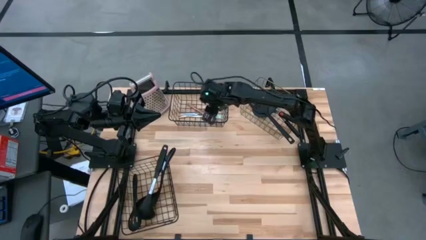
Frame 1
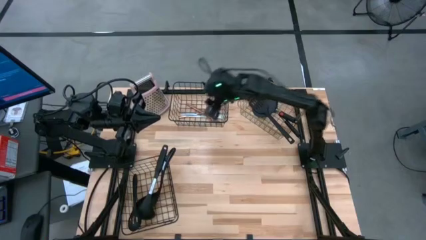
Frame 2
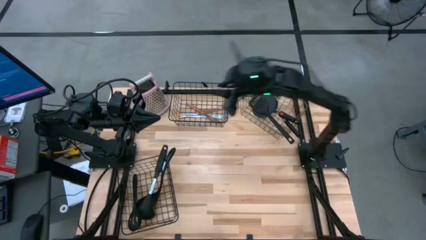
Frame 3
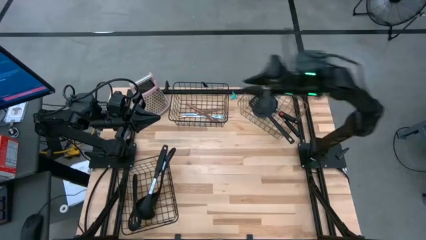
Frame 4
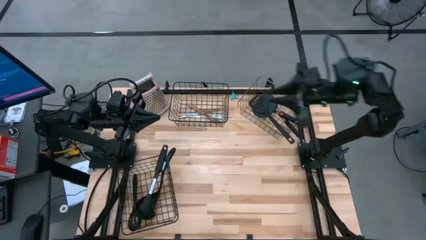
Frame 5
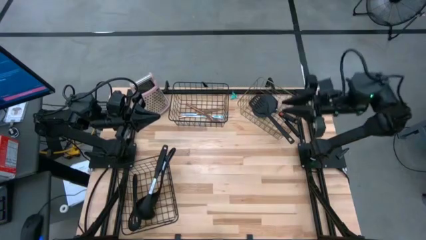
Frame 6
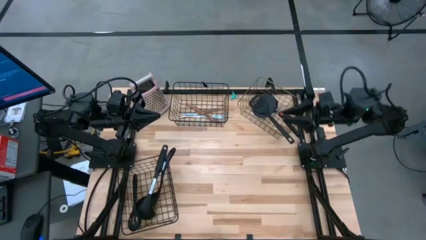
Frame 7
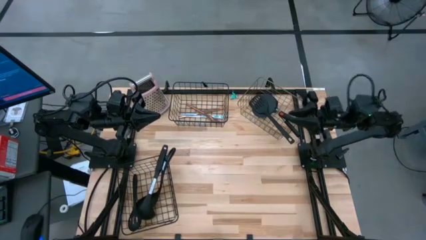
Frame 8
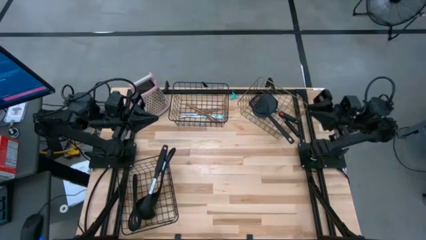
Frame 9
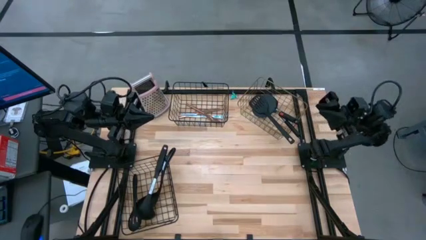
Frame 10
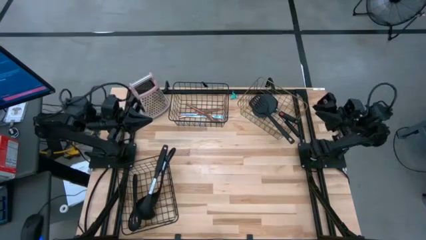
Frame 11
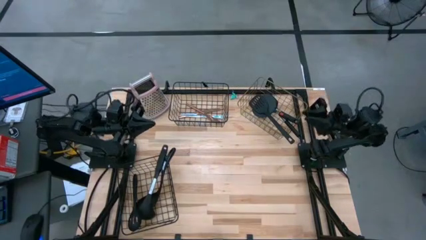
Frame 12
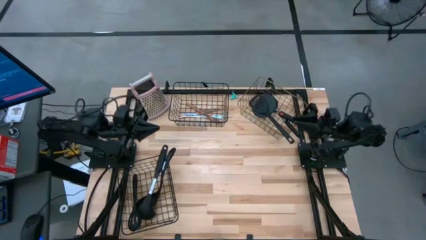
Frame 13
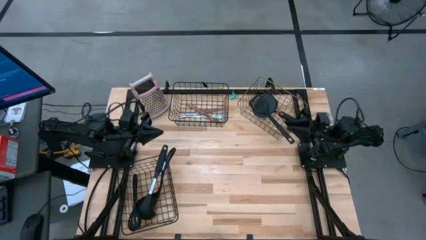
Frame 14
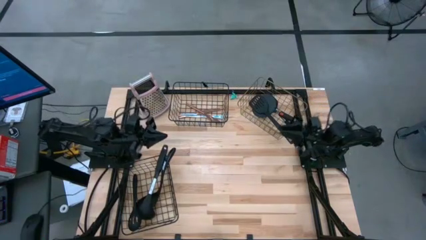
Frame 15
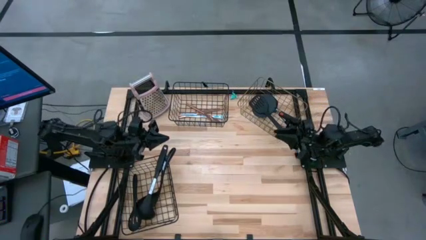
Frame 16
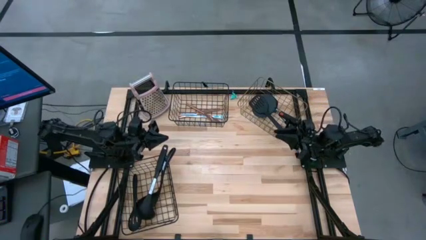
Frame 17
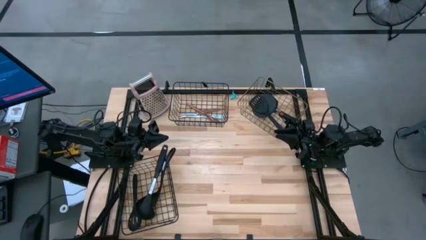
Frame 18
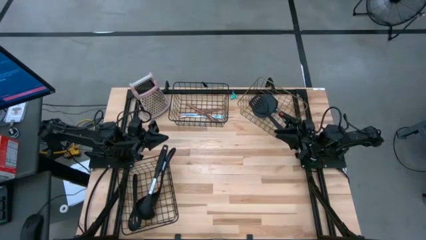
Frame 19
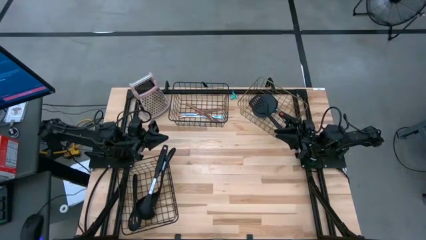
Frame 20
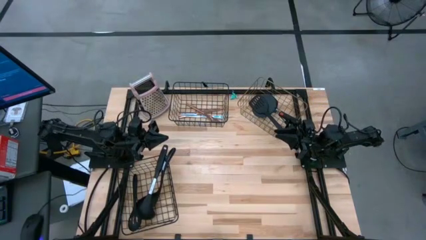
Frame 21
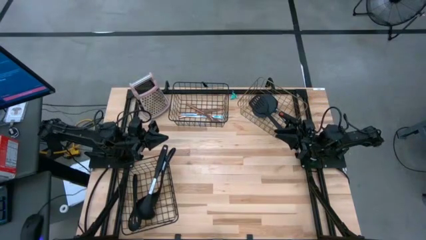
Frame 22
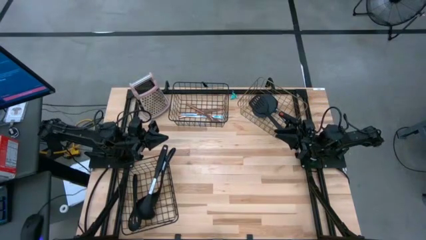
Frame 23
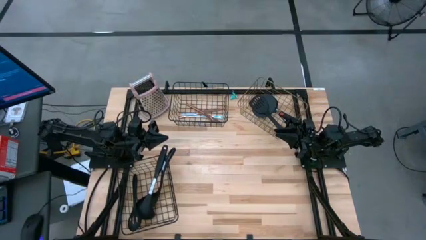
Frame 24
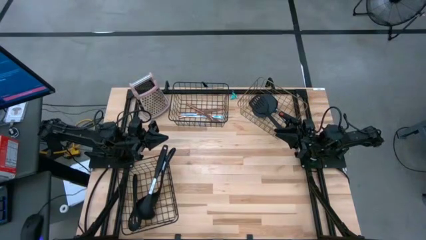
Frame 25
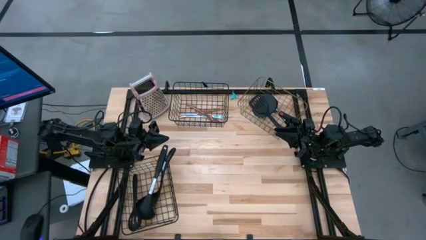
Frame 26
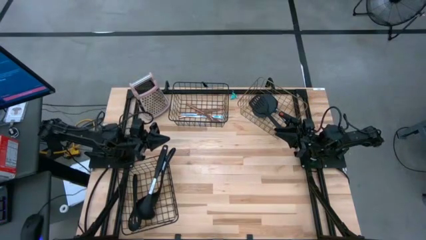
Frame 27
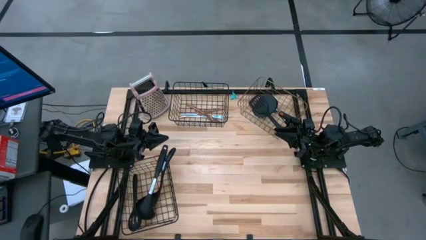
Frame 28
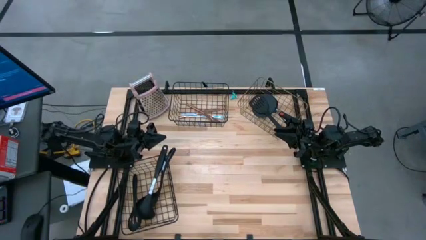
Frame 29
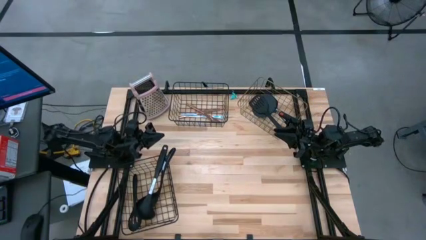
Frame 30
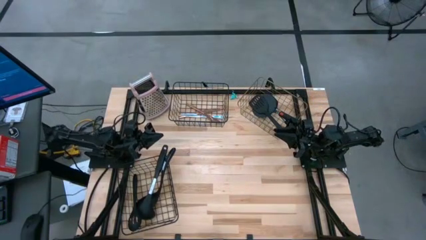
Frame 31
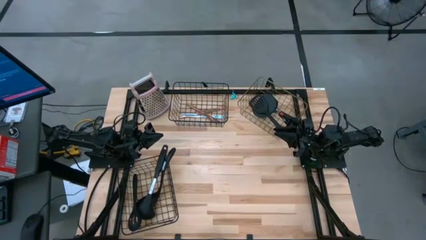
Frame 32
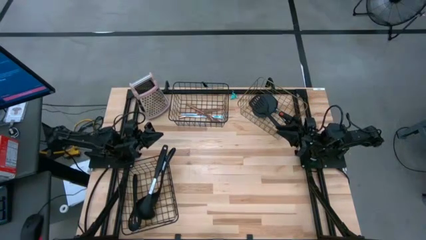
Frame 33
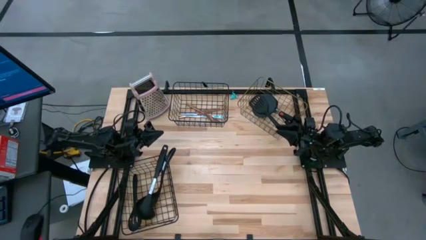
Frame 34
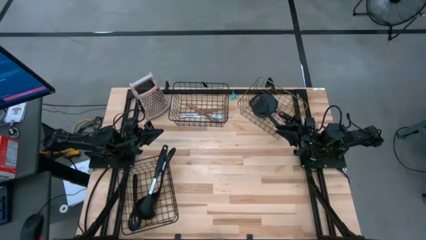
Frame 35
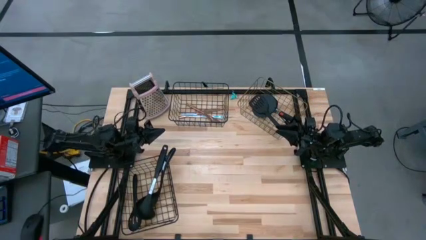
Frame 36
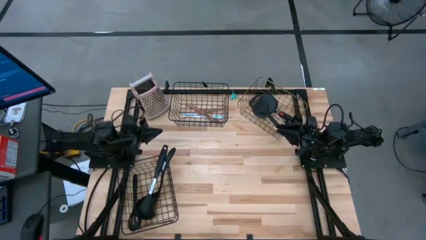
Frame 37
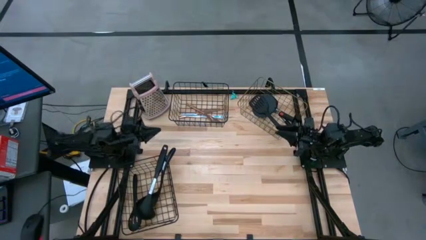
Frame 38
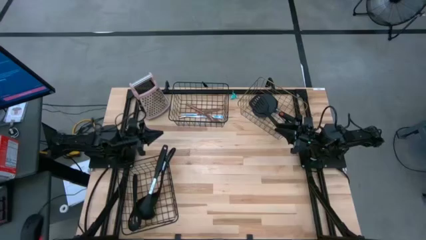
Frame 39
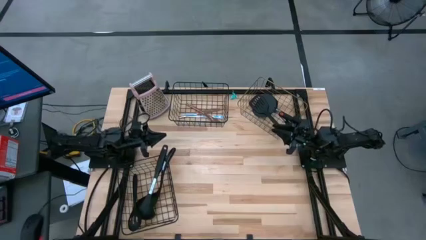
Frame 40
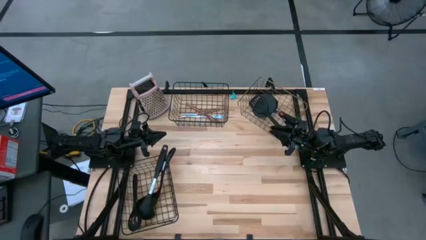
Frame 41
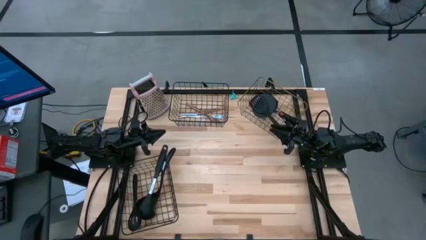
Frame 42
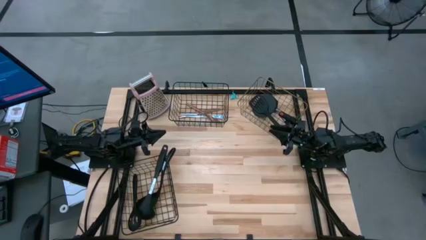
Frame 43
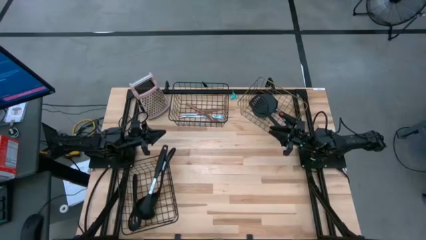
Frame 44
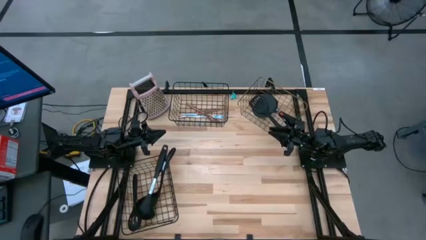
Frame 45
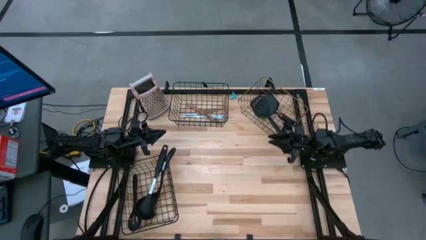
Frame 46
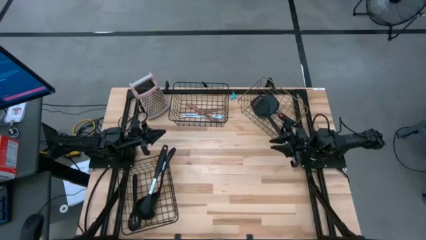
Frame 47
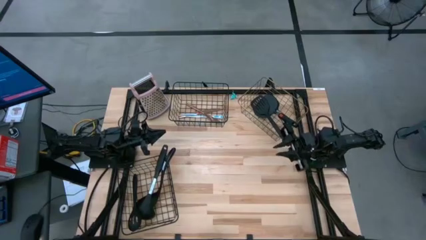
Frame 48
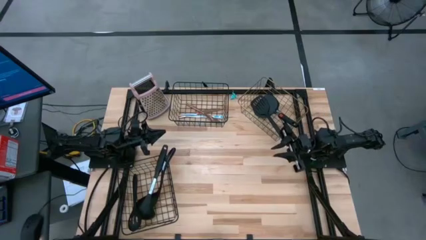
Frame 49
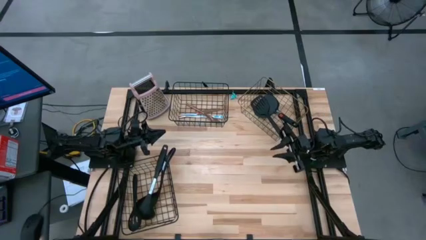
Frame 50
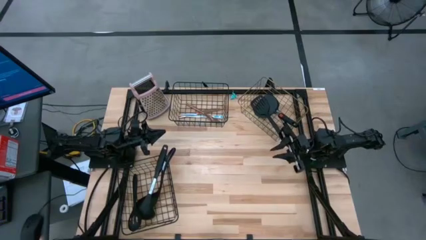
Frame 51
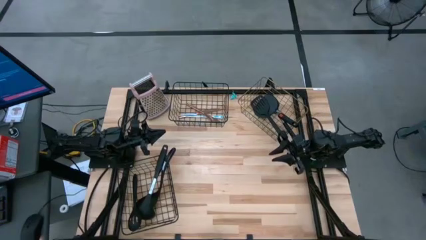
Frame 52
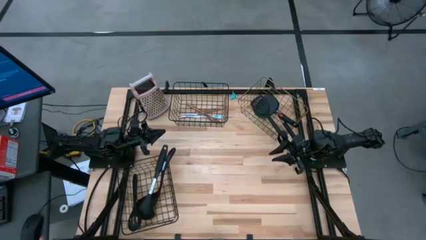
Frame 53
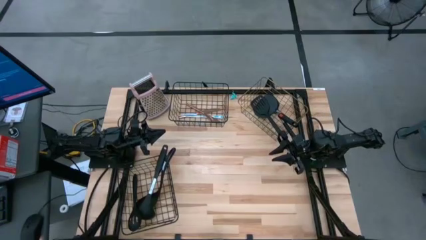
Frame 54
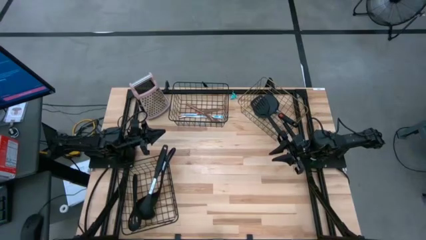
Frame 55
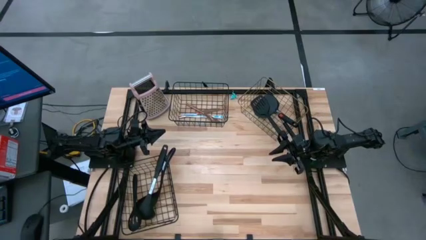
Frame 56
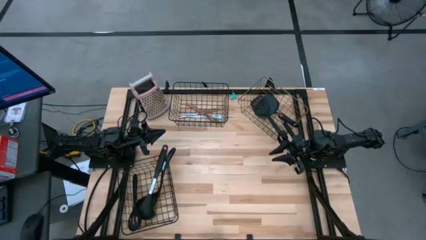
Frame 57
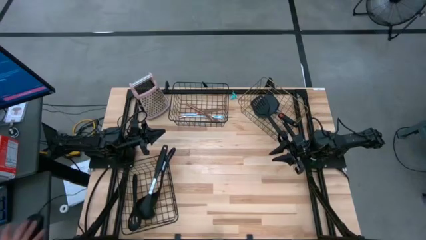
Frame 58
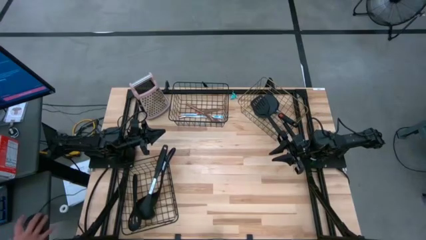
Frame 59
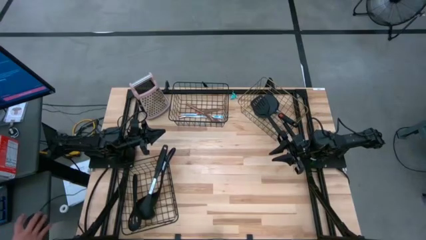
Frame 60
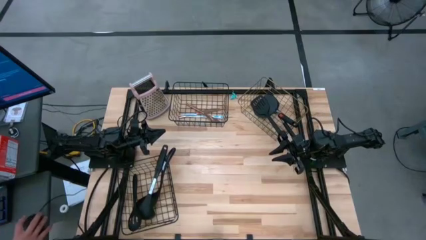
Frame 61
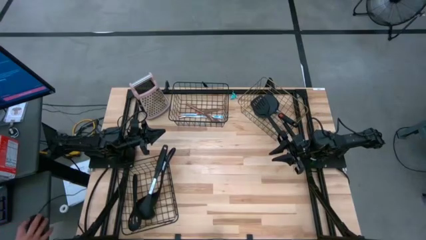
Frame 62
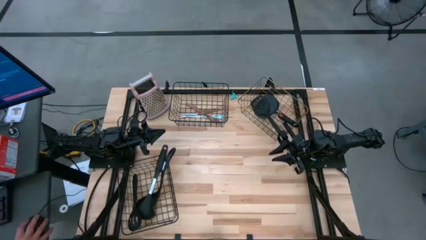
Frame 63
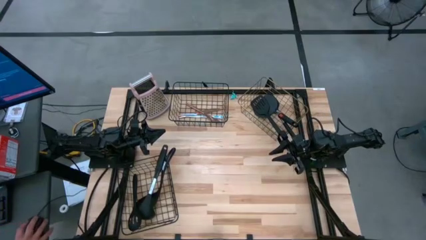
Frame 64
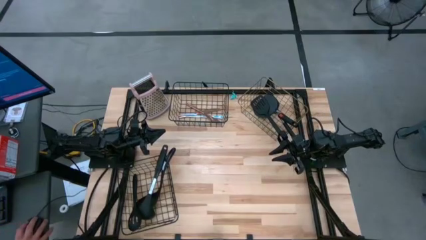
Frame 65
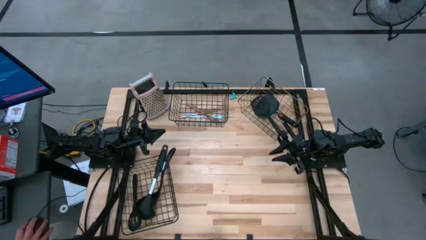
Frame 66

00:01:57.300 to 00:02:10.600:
Task: Pick & Place Kitchen Items
Return to Home Position

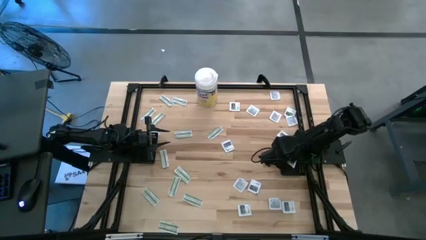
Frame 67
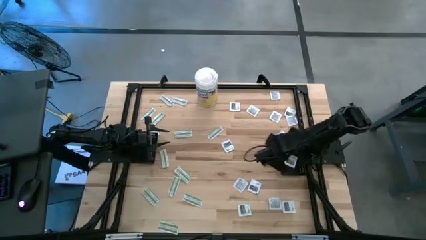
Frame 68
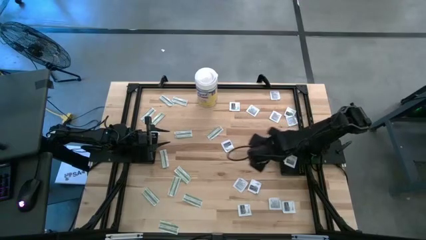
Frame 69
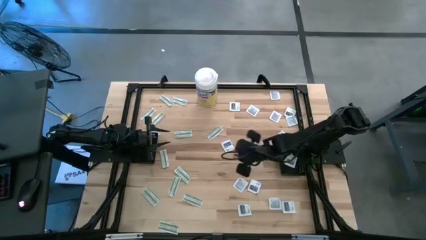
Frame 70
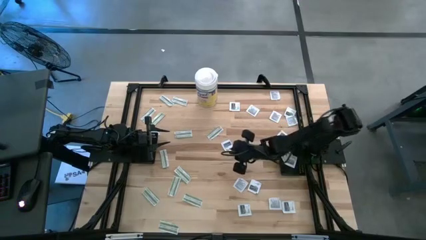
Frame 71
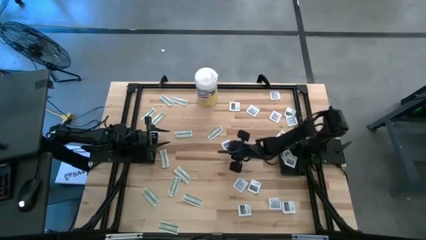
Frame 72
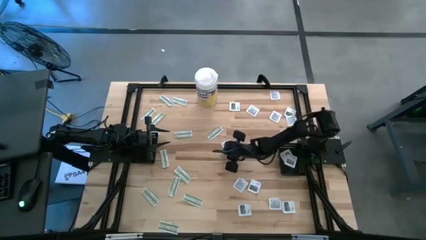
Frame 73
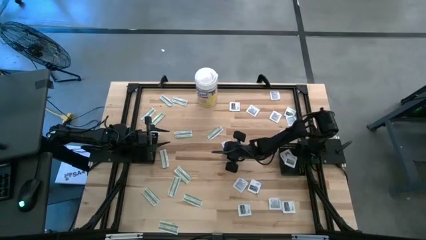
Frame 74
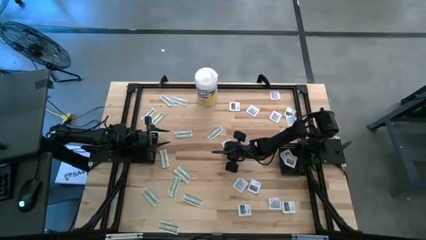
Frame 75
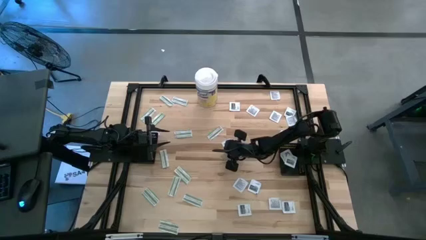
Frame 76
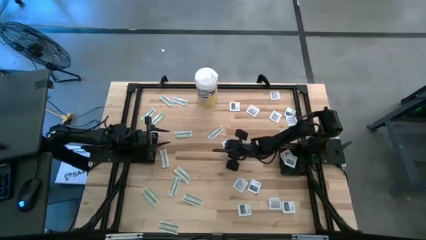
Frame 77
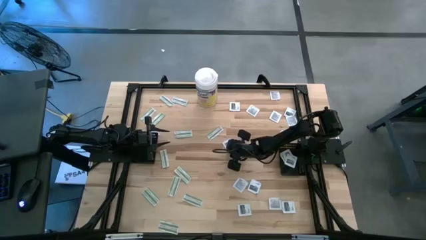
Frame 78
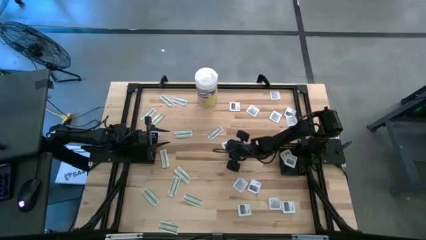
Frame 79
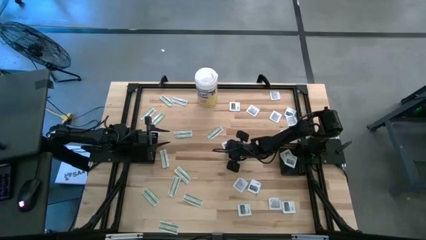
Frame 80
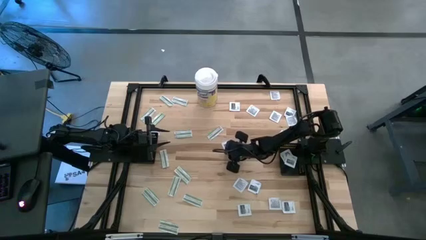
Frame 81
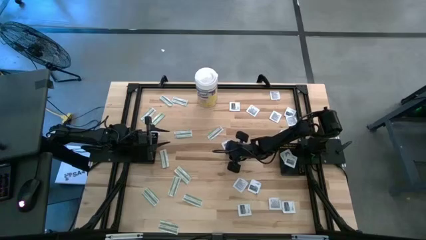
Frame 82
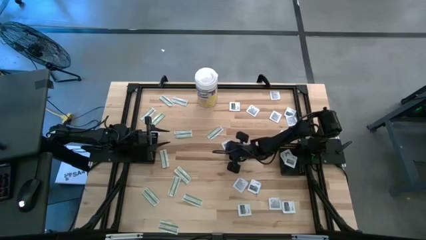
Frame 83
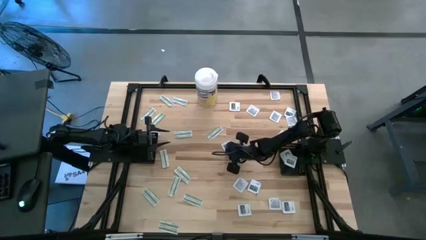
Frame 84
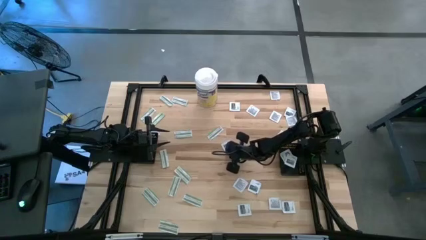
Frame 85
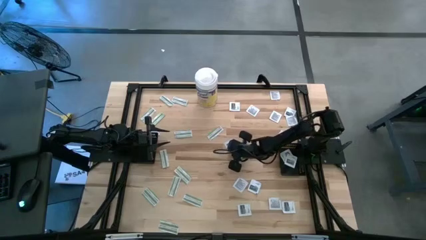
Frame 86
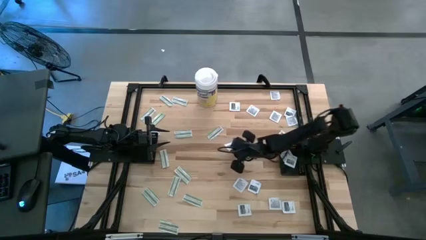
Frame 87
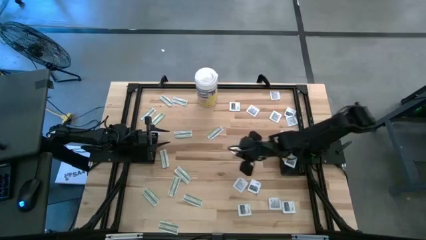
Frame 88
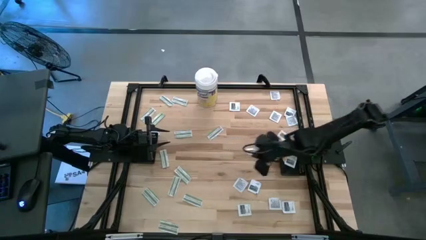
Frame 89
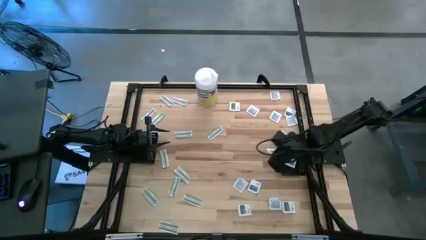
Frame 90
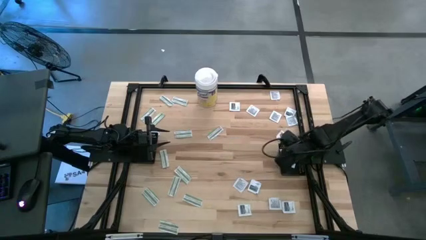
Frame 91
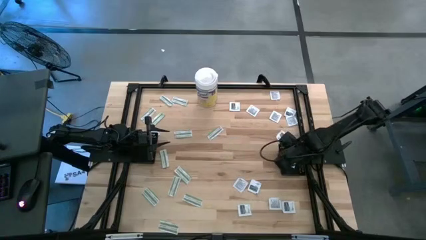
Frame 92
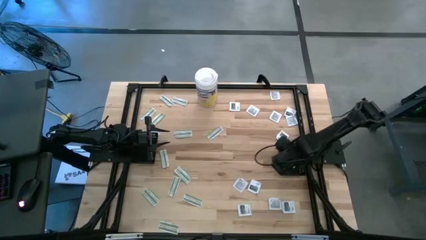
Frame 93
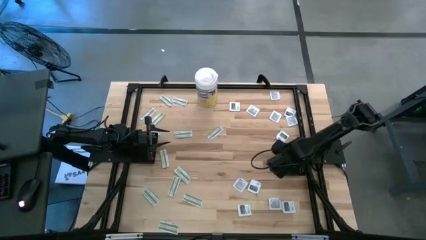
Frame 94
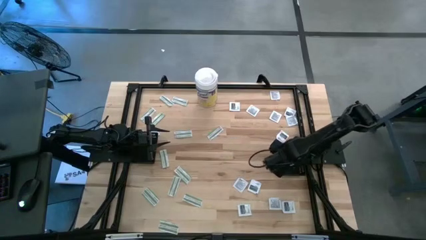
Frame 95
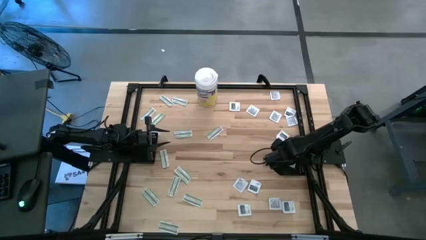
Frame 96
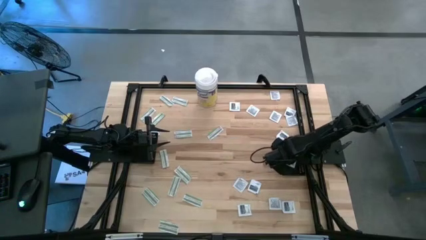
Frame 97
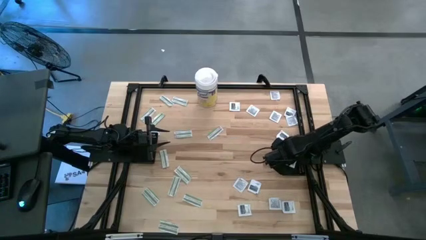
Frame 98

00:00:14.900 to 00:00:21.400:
Task: Pick & Place First Aid Supplies
Put the towelette pack into the right black basket
